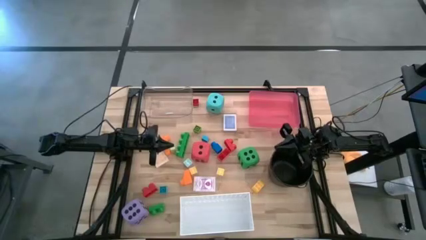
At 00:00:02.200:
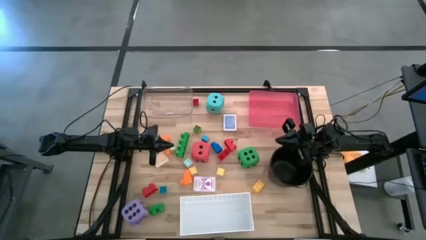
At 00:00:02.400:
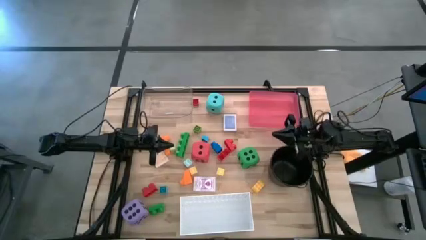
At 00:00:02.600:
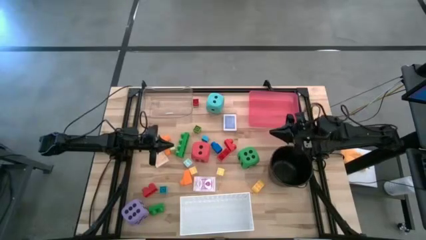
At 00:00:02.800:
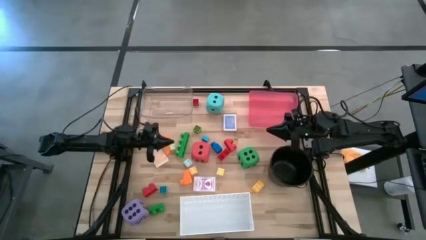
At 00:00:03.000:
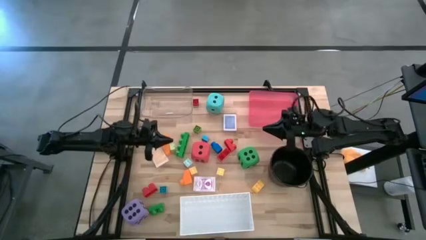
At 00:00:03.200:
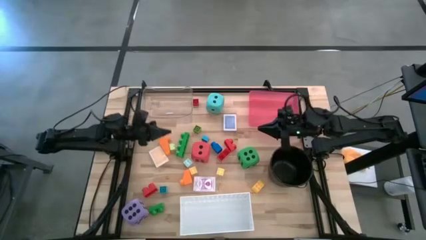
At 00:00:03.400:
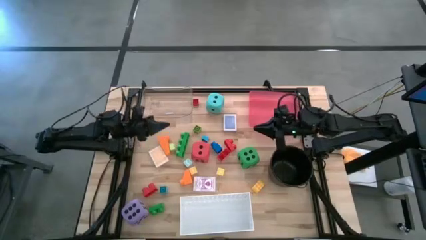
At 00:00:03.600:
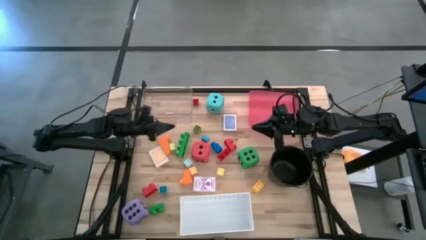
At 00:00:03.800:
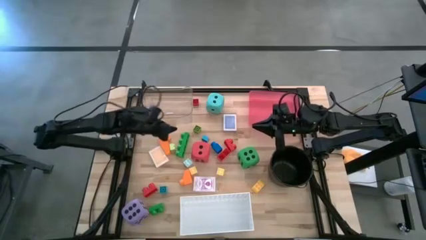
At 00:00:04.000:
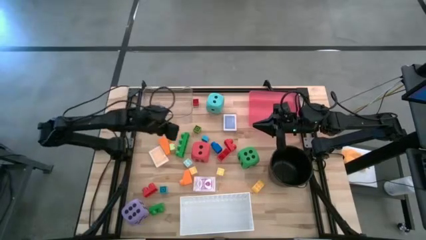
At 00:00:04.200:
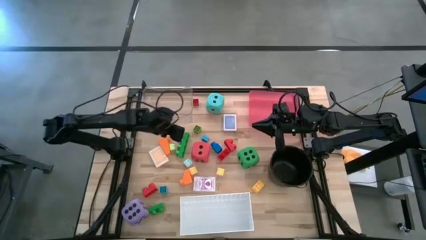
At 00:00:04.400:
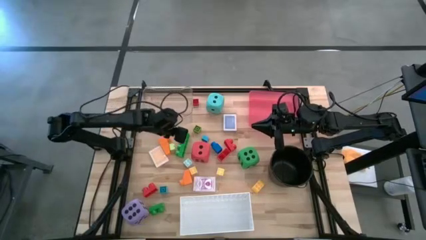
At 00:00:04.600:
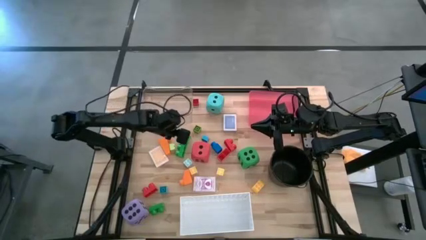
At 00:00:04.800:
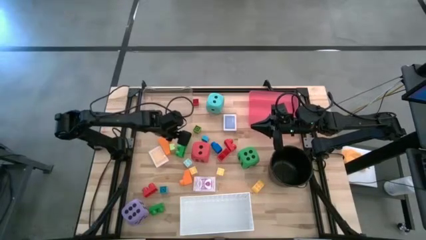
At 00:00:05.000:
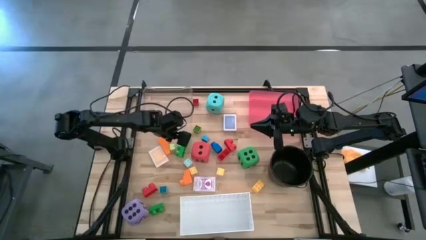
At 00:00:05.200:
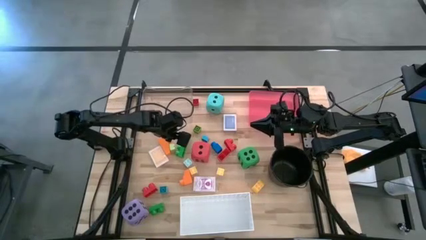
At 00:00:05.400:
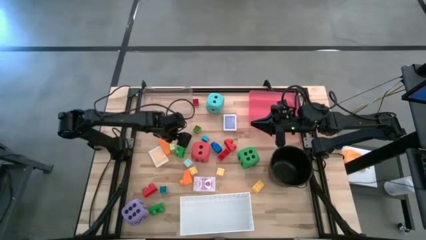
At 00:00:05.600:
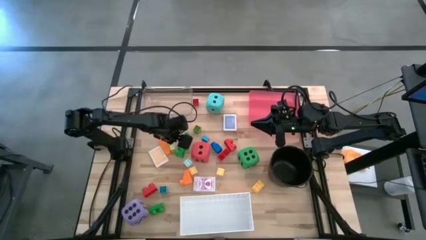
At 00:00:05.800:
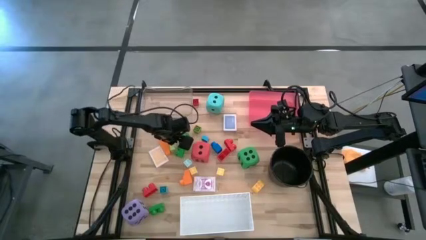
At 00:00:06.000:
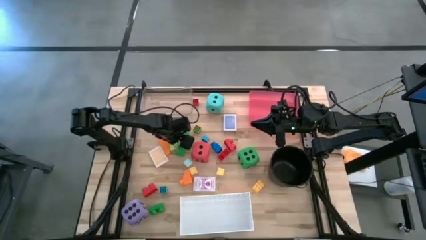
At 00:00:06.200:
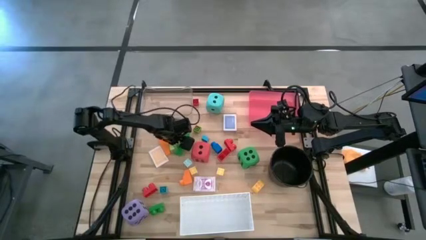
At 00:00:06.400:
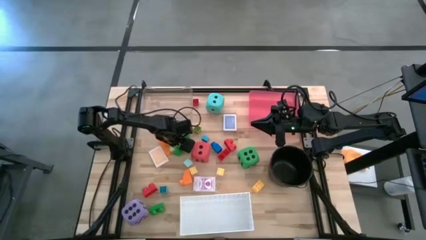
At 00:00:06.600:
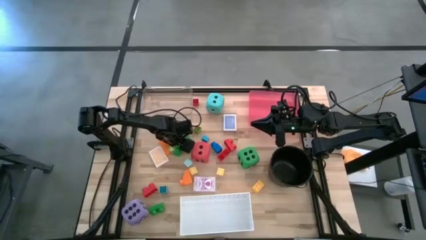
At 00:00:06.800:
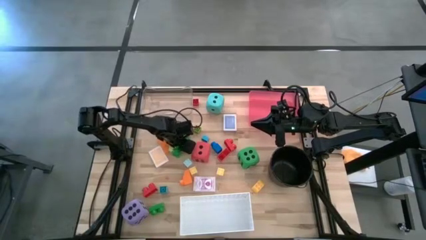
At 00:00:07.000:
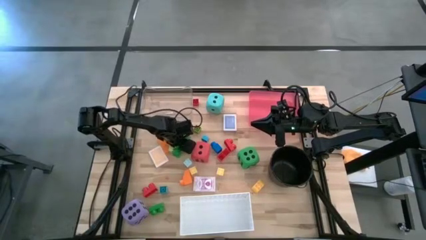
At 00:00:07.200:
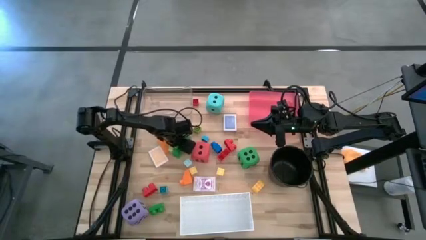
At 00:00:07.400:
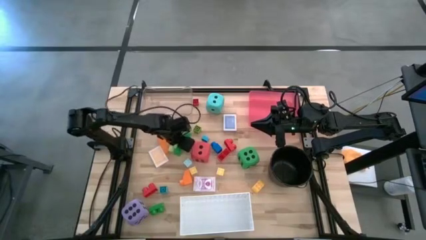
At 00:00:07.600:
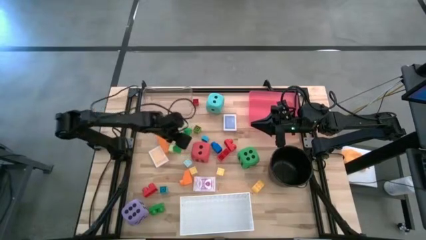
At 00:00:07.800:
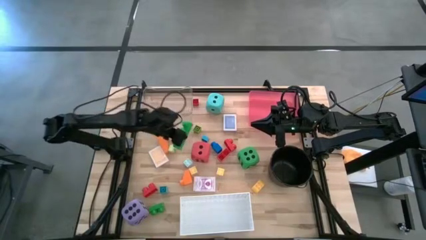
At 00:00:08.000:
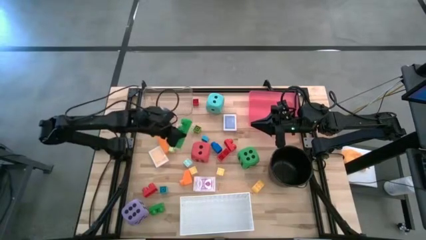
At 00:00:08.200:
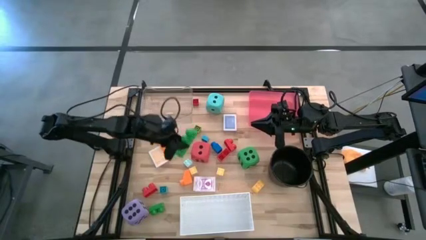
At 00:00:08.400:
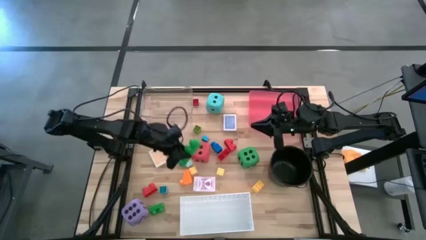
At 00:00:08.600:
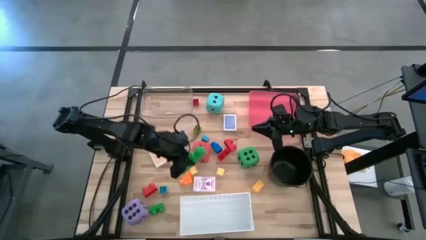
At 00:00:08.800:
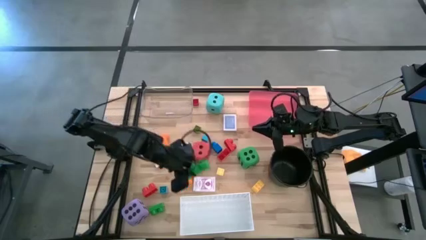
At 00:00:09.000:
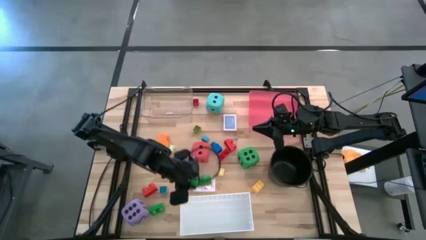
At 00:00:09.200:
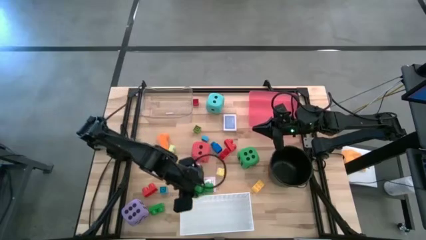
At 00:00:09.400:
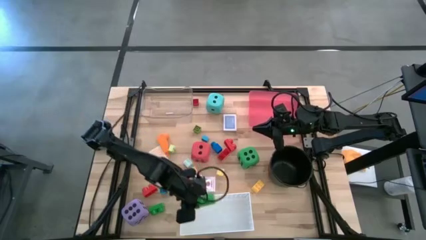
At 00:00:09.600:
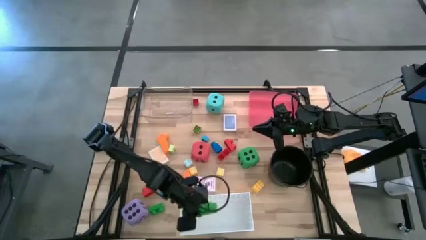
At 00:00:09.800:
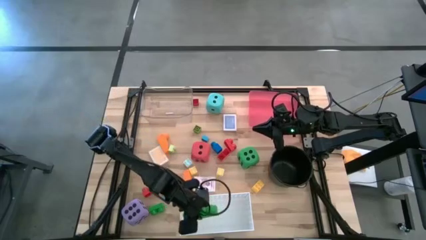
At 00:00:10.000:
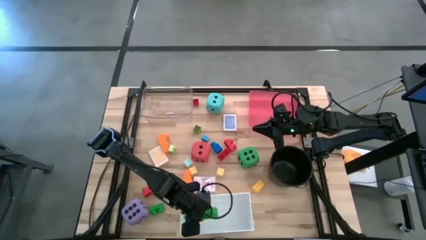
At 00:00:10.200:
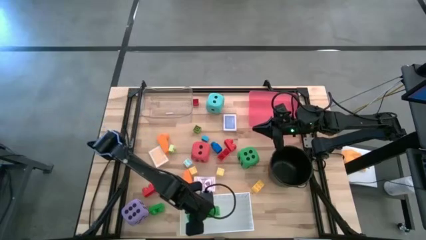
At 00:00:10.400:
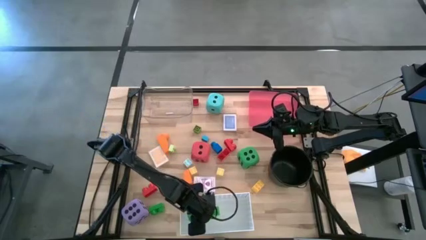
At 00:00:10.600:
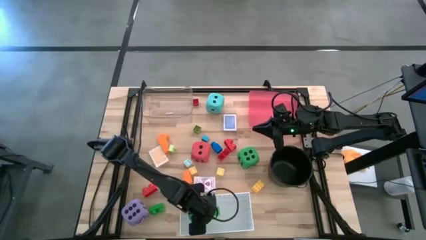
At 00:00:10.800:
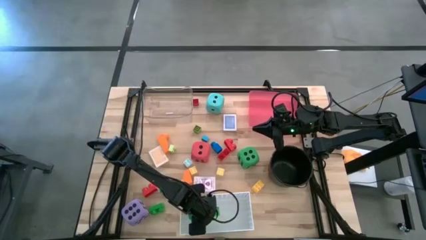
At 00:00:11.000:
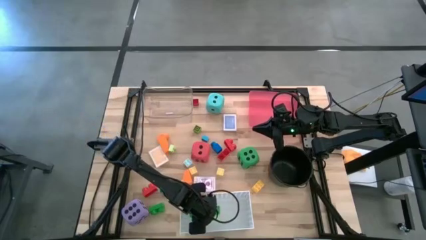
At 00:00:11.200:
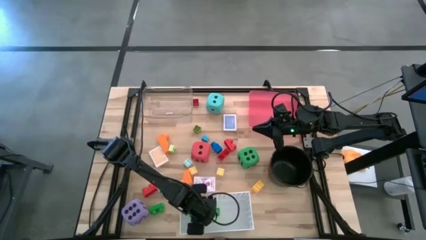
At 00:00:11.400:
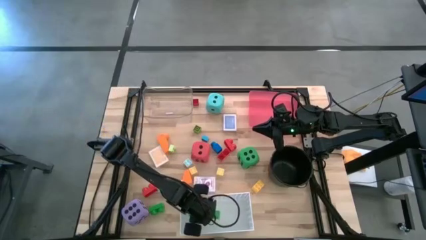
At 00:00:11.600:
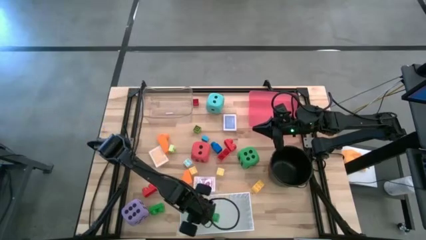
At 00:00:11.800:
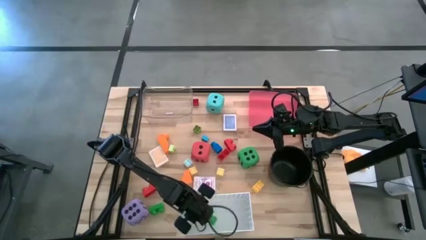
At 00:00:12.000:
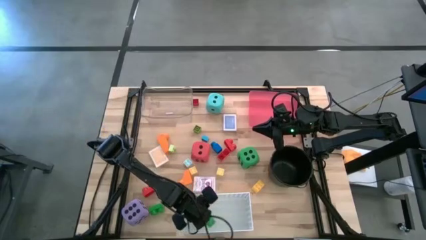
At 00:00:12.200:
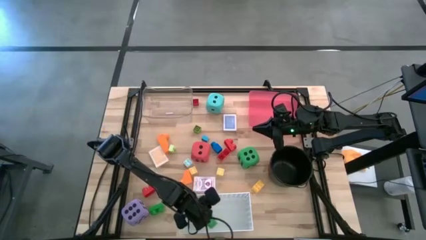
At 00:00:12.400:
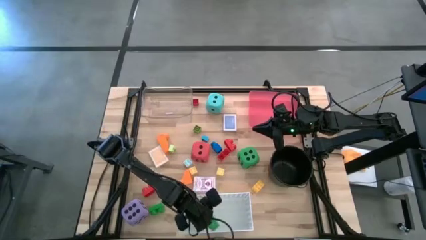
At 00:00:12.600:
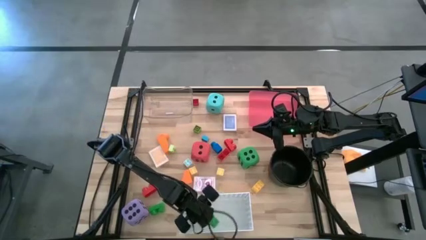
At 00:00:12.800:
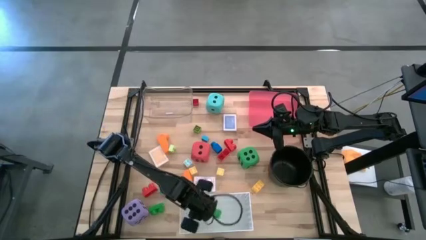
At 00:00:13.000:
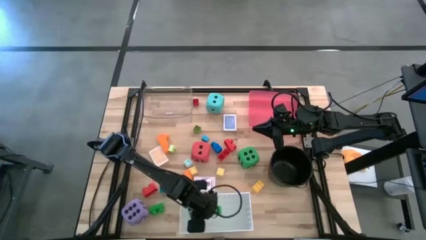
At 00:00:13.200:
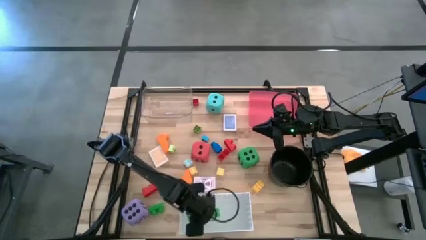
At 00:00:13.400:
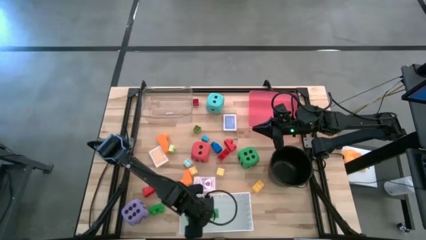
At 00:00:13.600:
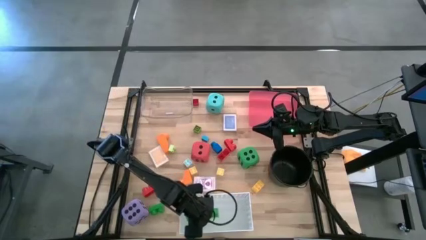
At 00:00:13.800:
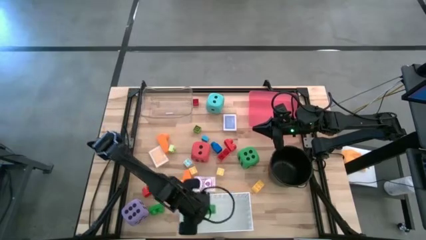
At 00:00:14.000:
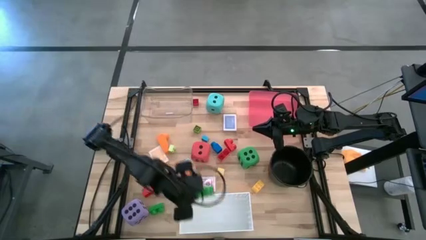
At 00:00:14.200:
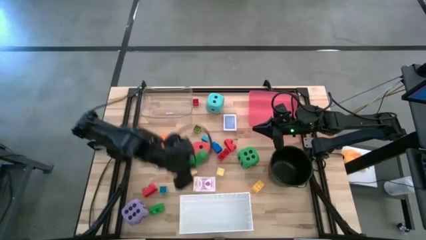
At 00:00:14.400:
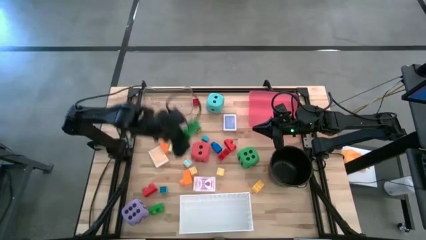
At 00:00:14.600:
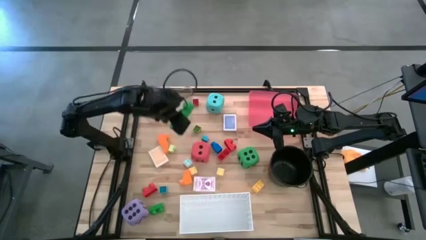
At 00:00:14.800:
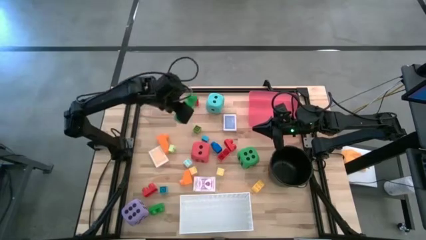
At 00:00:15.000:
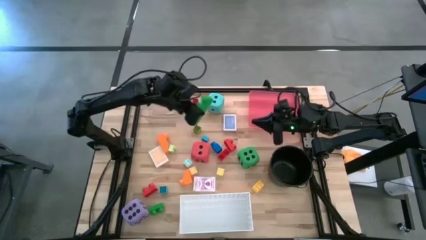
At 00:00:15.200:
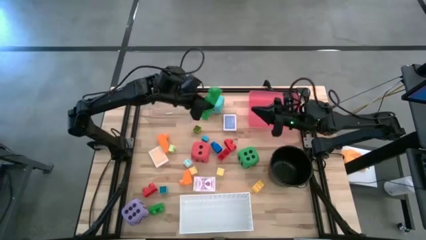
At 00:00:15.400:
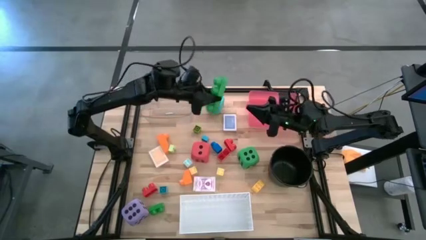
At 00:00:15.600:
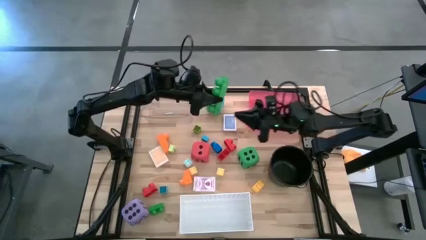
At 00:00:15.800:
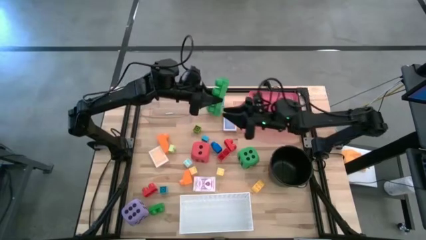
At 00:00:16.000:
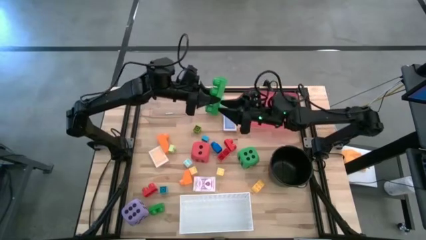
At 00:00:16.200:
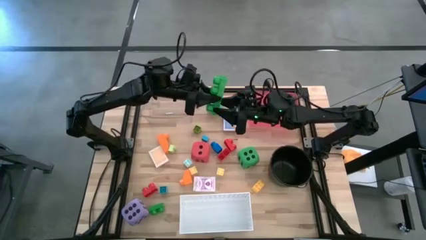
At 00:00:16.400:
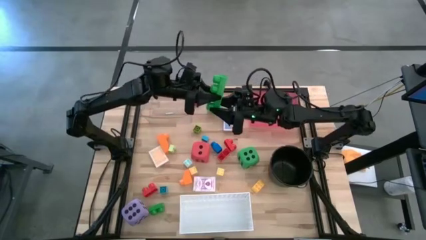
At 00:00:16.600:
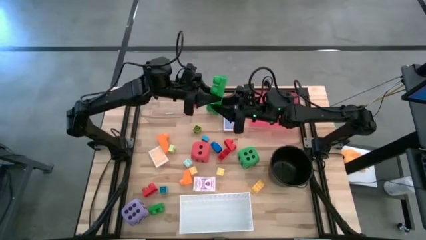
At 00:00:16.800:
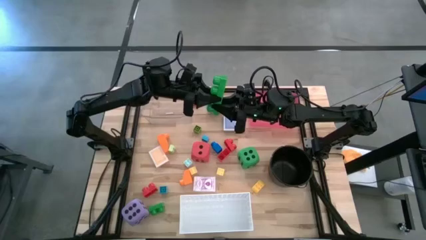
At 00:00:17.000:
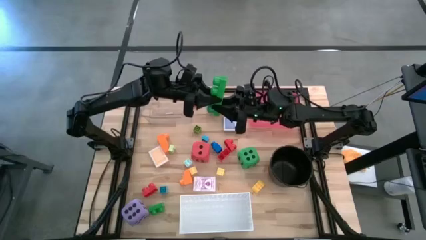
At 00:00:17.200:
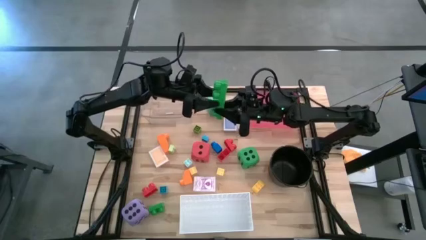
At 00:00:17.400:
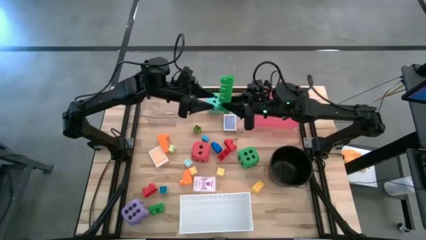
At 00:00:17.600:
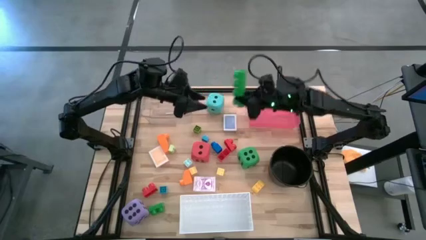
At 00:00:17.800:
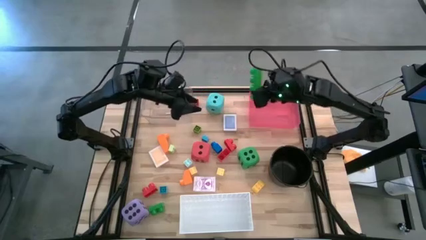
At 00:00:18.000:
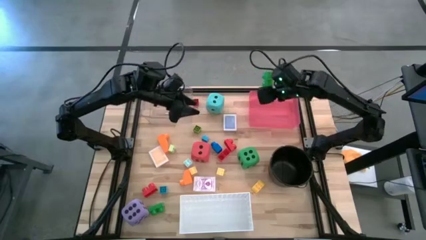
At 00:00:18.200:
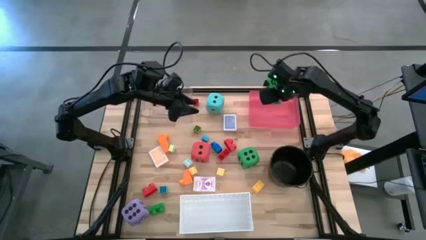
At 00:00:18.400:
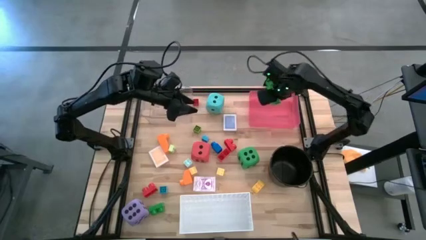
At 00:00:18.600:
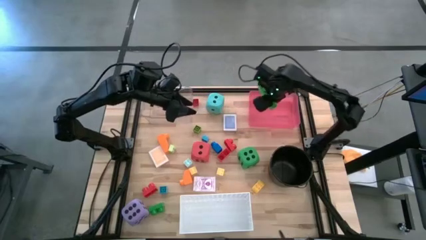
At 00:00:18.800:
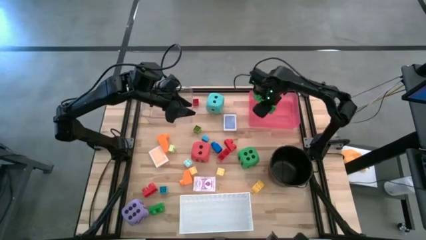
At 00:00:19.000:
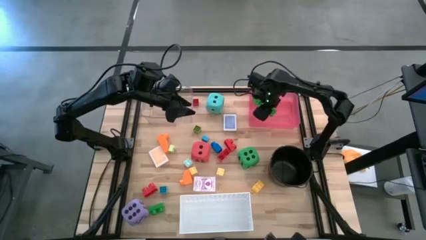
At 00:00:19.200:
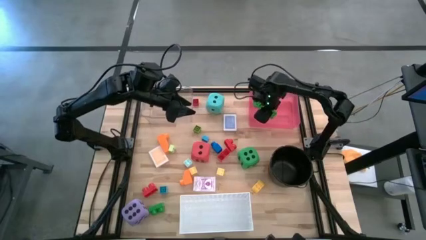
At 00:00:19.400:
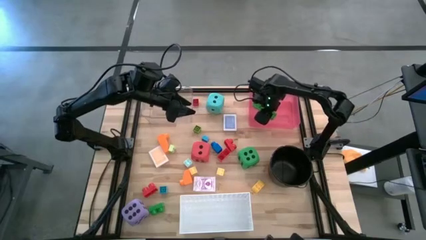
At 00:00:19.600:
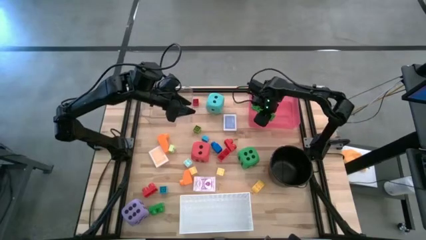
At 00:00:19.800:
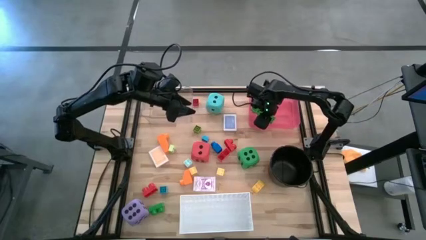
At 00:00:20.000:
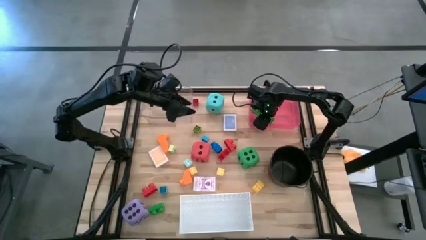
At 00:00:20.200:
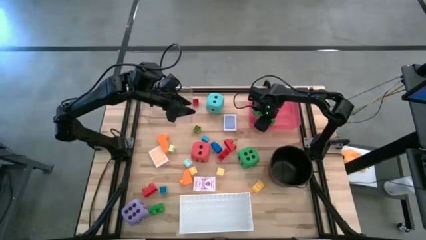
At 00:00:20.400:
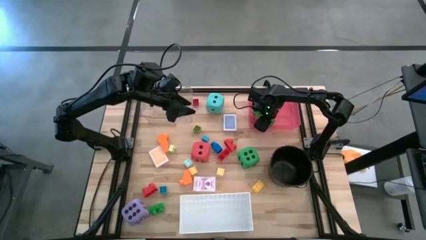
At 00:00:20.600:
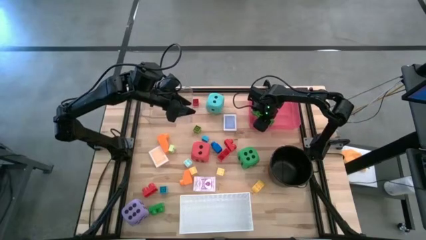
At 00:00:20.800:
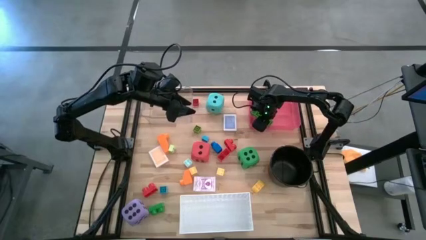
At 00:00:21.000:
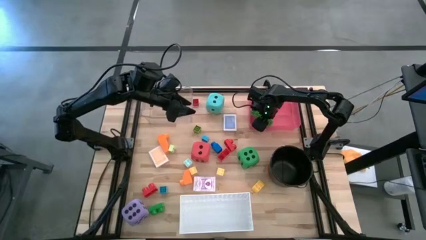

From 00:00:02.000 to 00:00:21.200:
Task: Pick & Place Toys
Put the green game piece into the red bin
